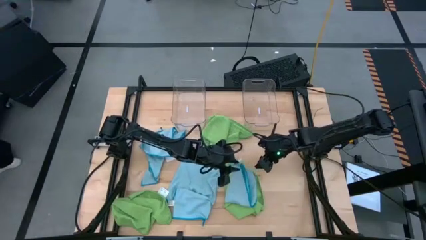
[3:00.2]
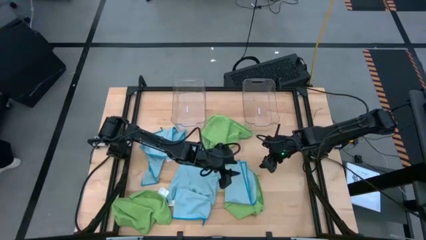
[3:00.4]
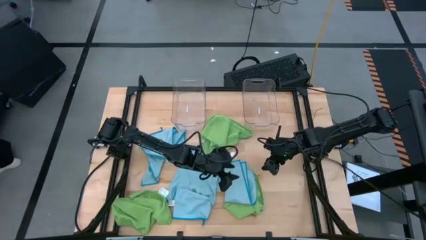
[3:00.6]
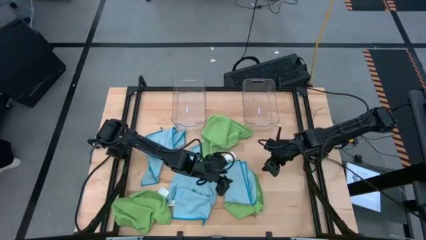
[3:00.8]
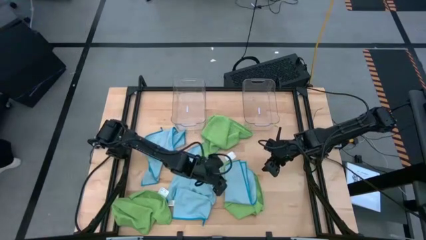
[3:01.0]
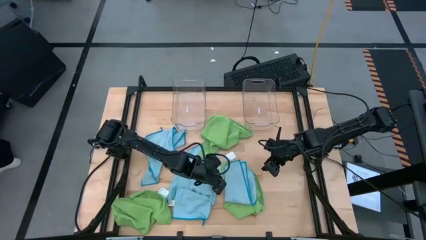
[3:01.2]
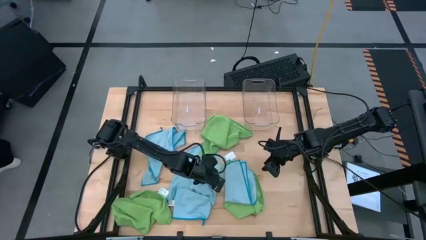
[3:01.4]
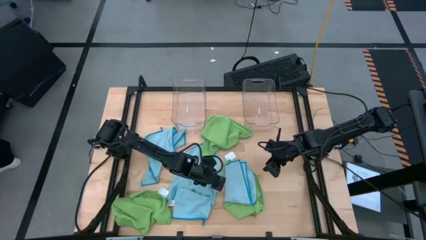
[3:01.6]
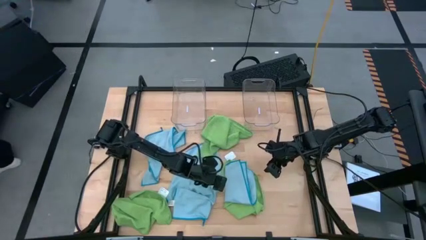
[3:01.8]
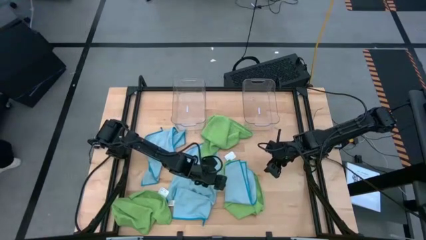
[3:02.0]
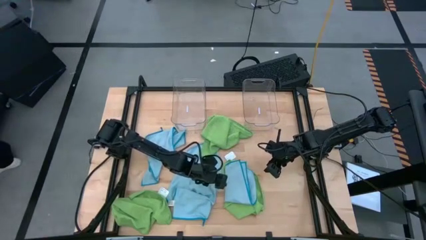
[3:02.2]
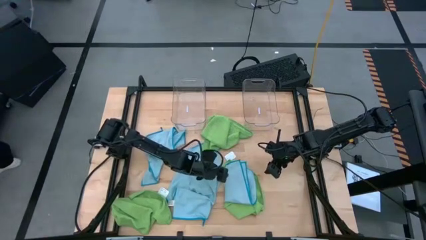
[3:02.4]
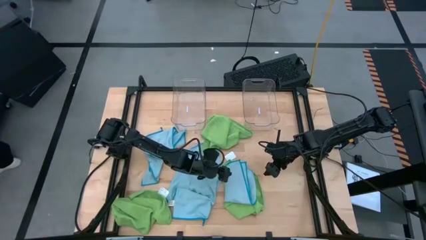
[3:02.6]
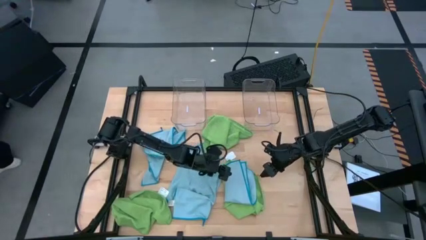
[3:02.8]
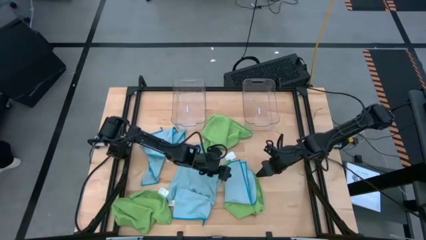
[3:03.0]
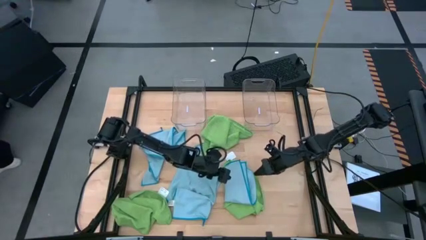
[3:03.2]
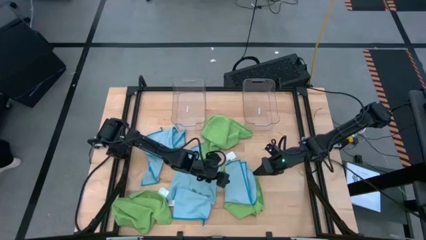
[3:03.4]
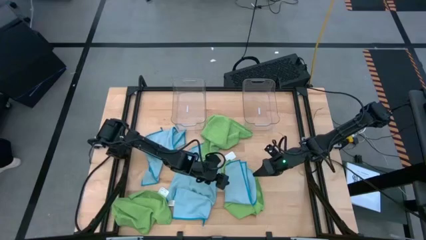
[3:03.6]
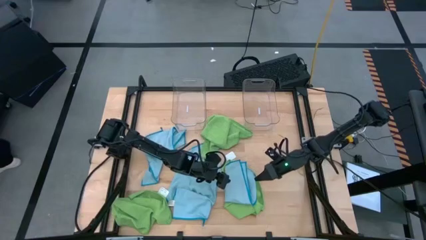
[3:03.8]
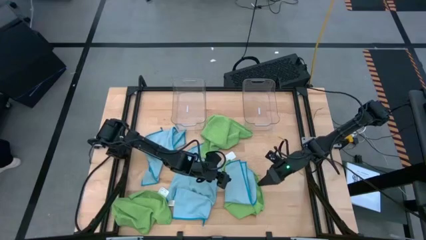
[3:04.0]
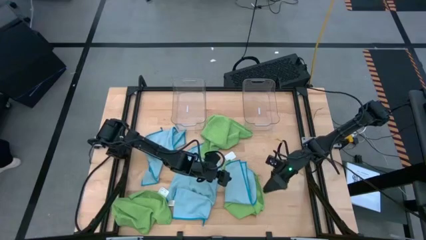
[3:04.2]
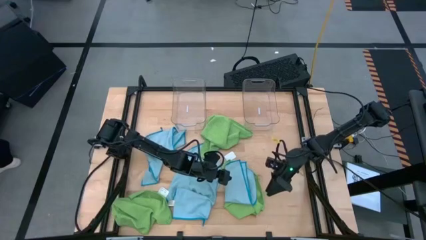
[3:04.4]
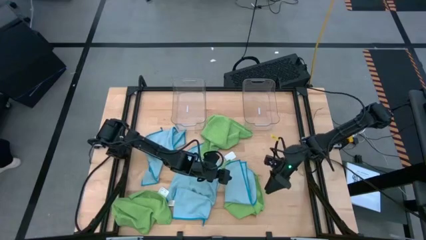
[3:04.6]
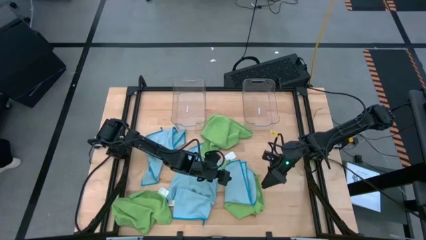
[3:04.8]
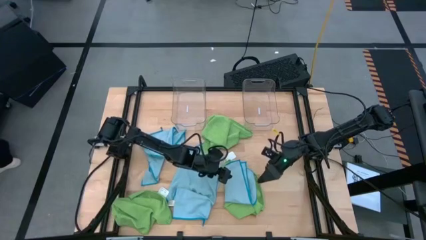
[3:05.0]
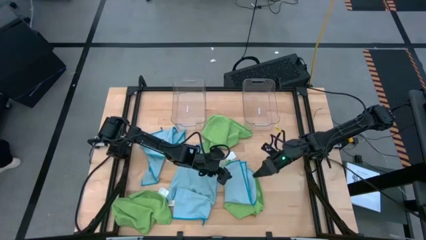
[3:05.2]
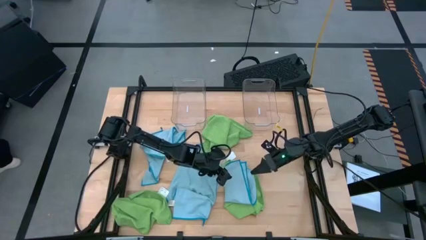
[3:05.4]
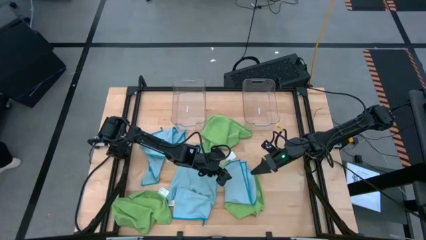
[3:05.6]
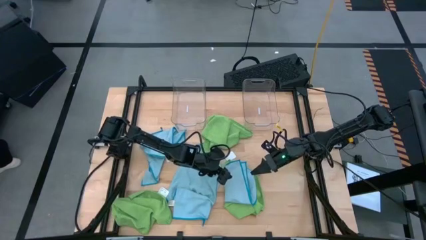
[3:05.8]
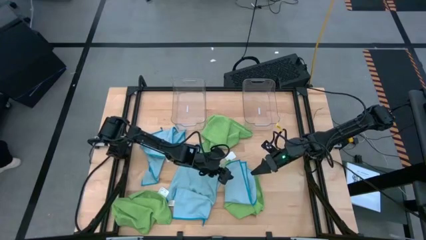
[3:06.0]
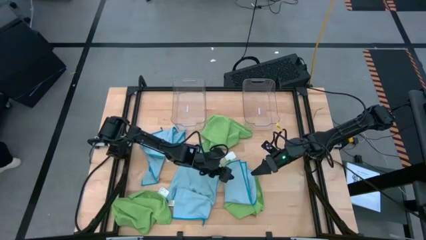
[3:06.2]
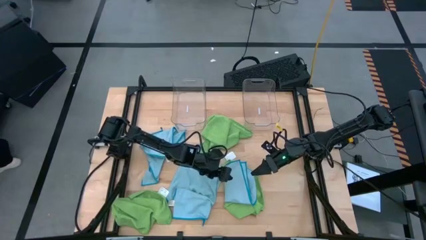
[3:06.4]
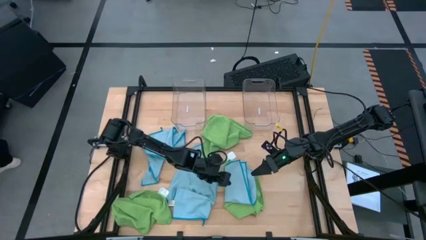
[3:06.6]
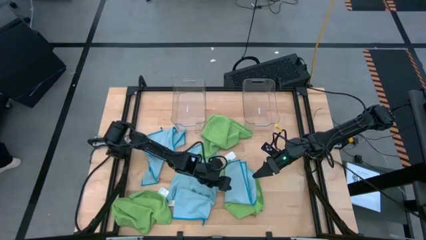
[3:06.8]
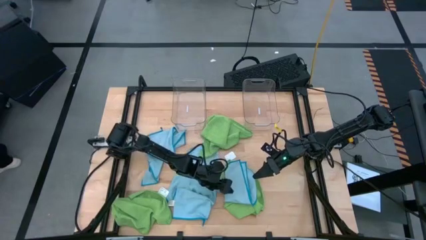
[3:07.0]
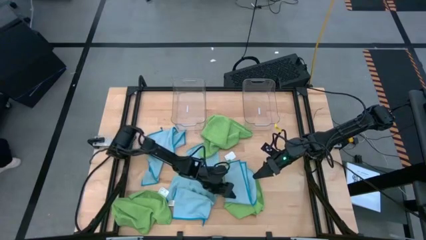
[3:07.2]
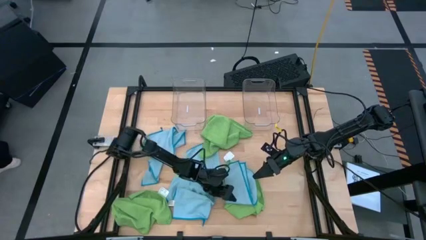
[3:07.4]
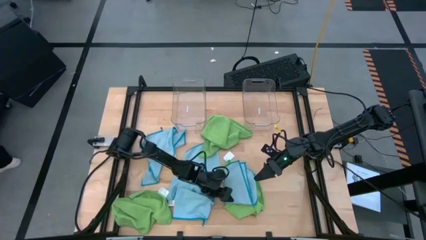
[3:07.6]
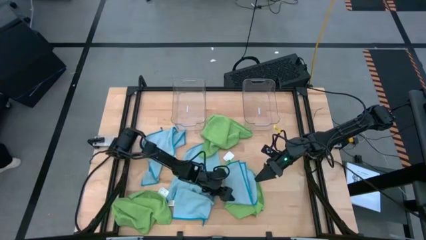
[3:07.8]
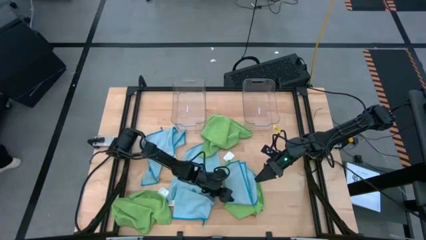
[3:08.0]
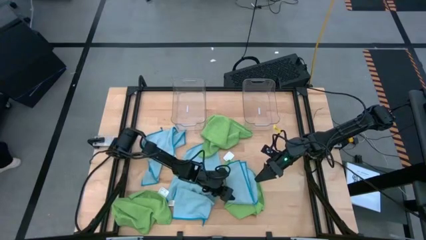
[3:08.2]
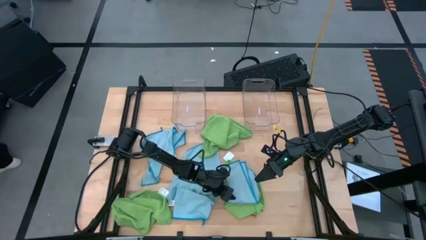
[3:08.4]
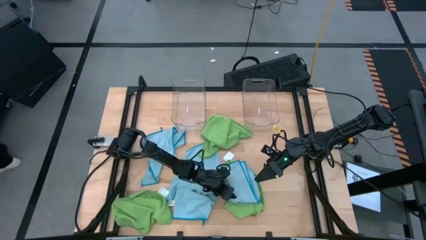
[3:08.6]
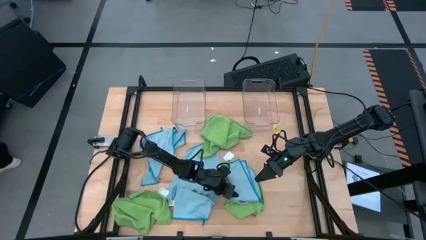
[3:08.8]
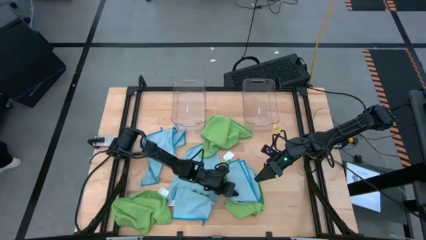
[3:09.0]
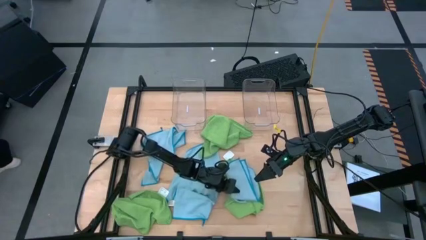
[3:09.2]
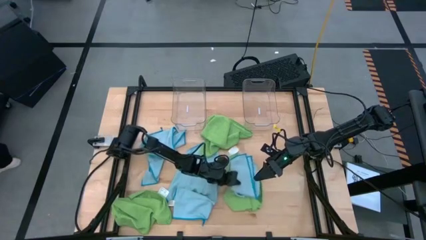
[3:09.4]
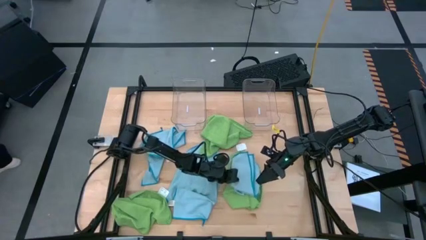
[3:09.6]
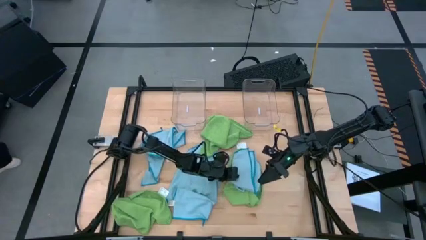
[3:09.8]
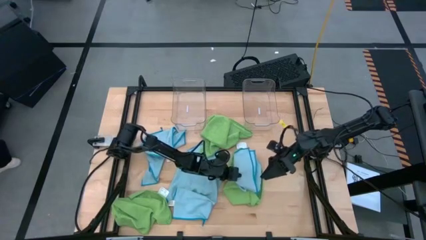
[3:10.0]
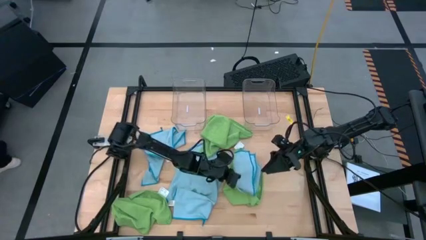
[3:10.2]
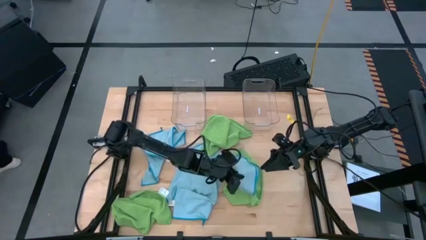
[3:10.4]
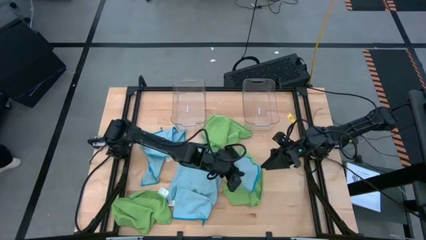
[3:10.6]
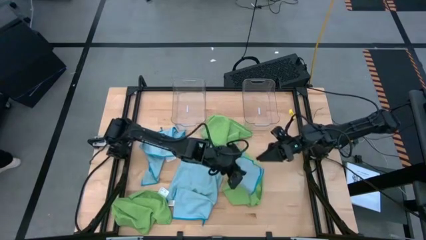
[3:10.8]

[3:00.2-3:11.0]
Task: Fold microfiber towels
Put the right blue microfiber towel into the right transparent bin

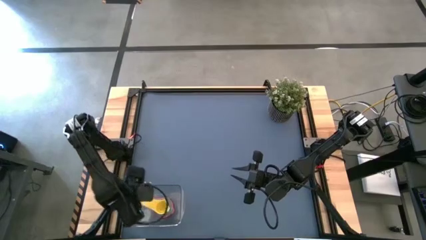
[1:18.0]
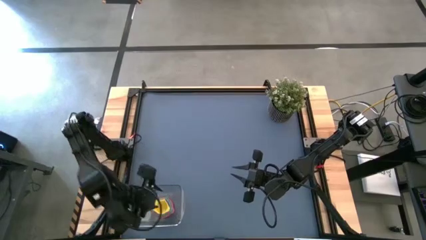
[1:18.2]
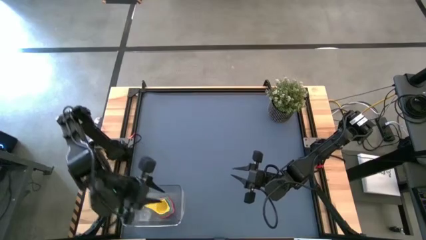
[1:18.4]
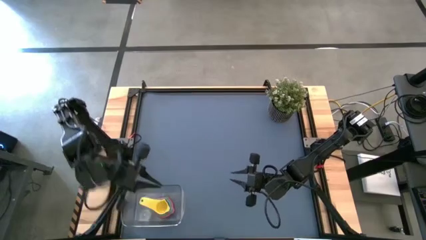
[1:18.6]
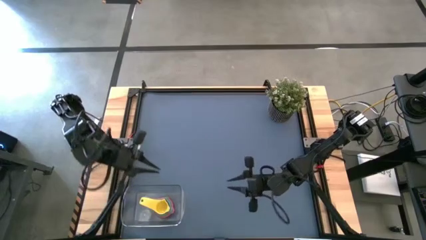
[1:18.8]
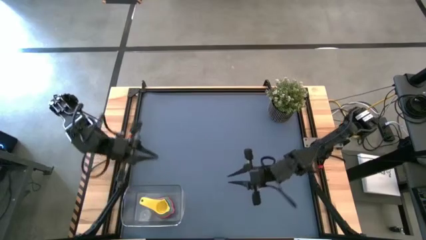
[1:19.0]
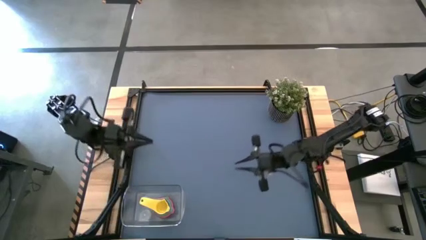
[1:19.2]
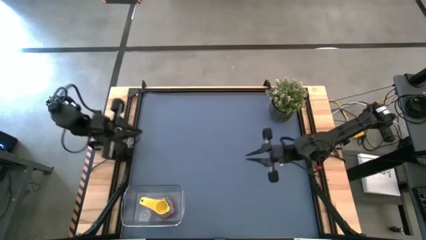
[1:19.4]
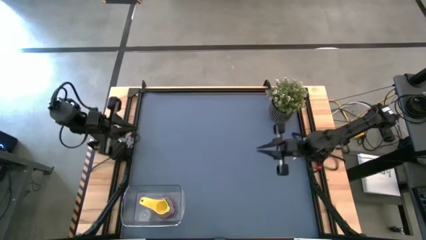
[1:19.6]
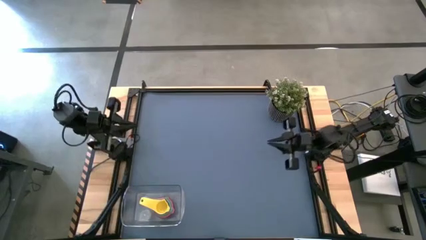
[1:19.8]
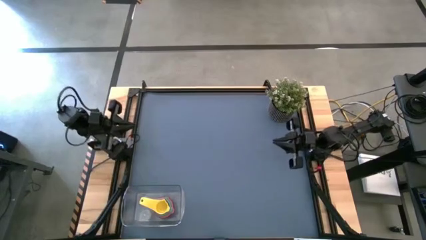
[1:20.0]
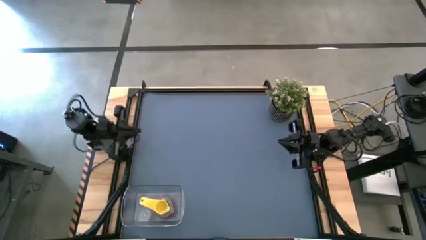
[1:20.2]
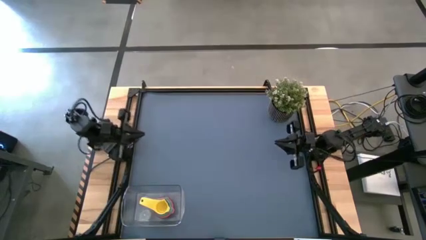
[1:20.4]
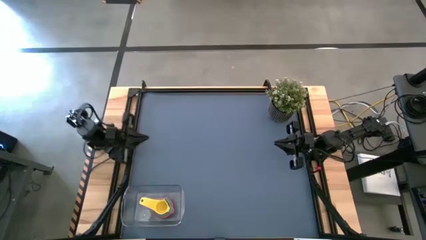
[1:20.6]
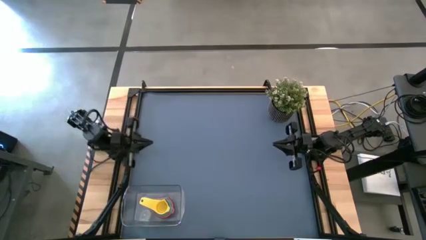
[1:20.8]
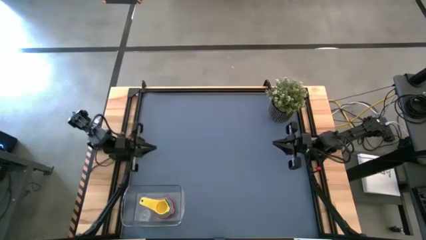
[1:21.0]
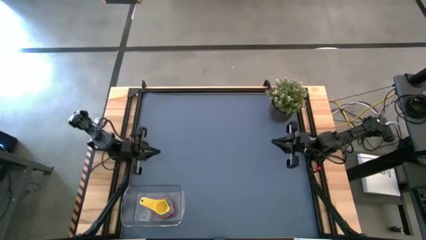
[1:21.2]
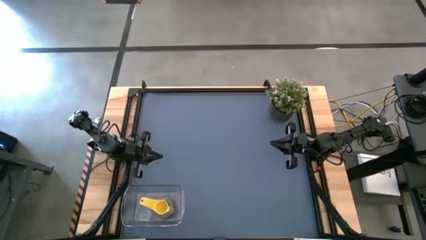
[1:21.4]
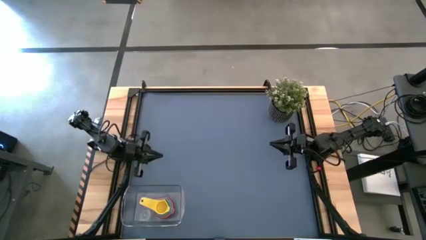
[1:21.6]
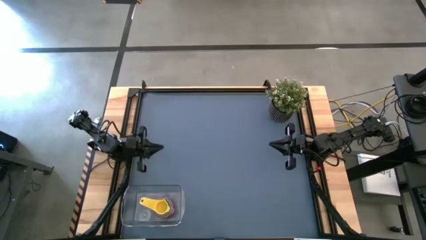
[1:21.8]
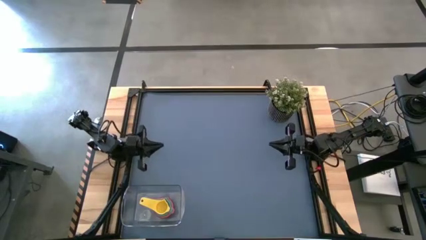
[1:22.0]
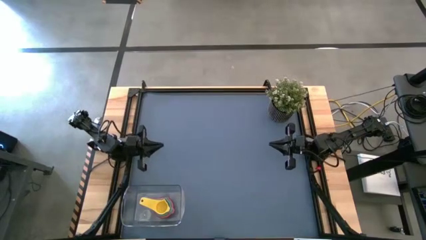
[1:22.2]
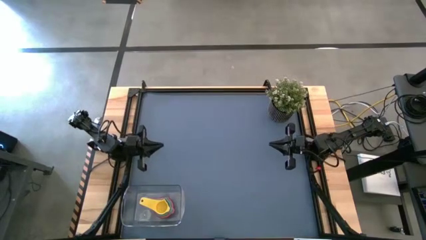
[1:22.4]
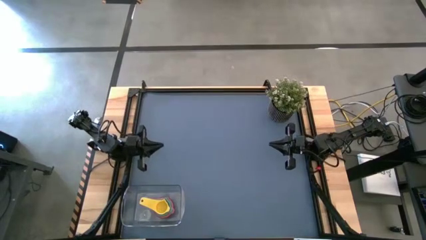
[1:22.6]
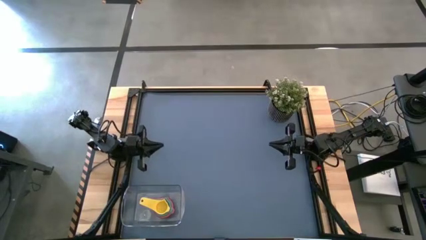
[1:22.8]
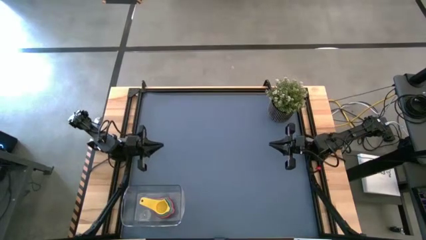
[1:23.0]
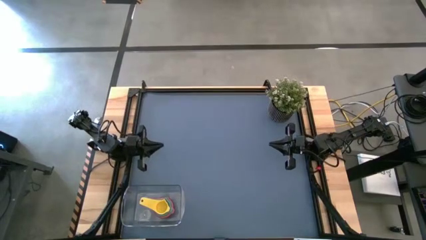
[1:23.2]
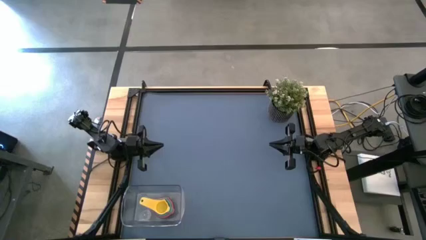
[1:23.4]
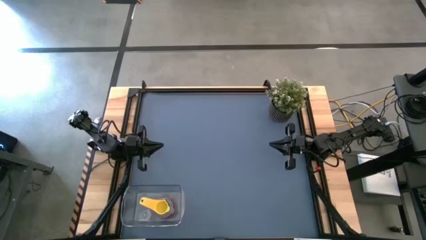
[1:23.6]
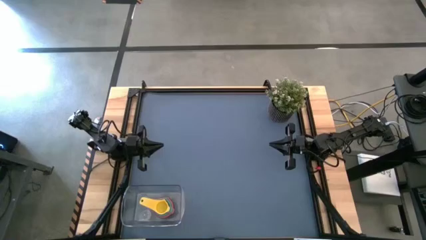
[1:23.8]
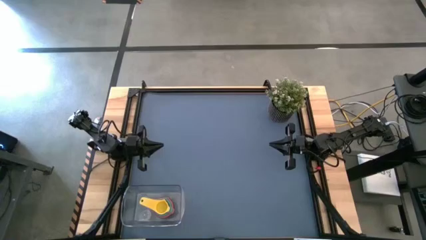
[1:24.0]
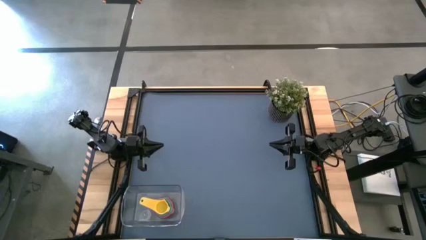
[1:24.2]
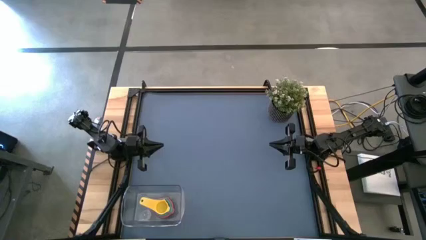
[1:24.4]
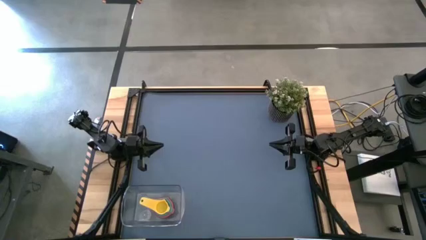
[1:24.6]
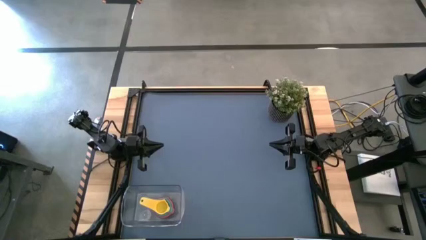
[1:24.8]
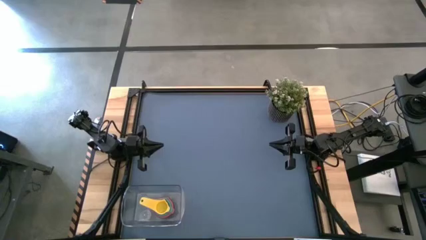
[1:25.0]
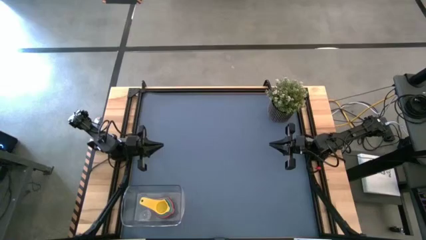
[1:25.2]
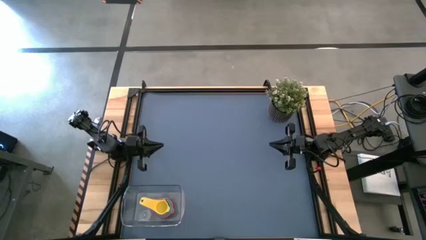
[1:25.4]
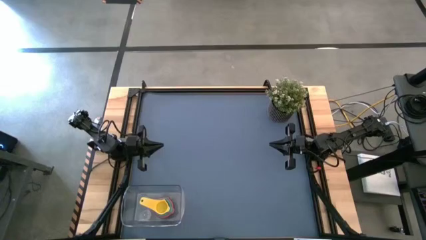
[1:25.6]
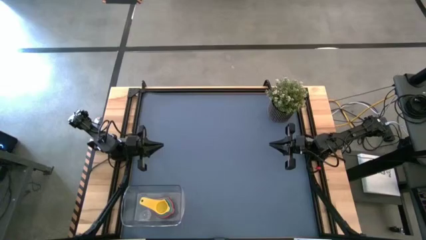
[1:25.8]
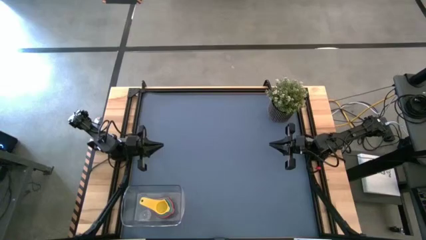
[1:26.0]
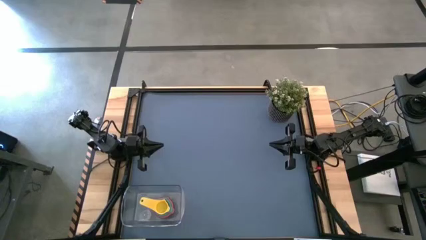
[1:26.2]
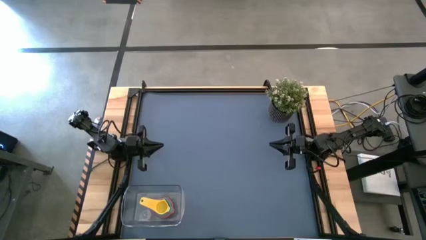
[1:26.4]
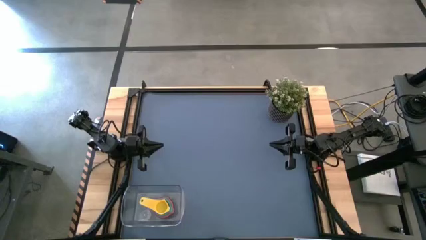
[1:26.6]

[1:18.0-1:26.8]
Task: Nest measuring cups in basket
Return to Home Position
